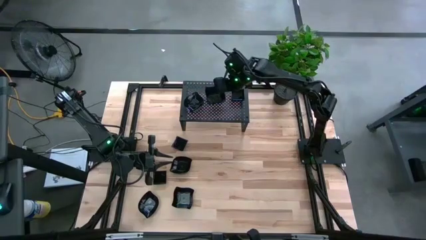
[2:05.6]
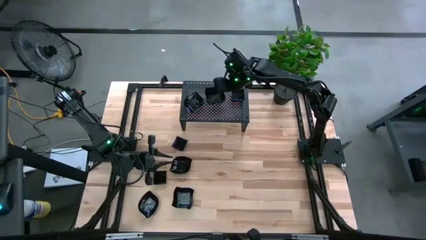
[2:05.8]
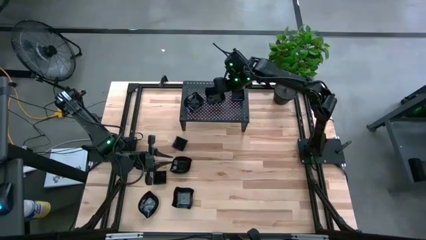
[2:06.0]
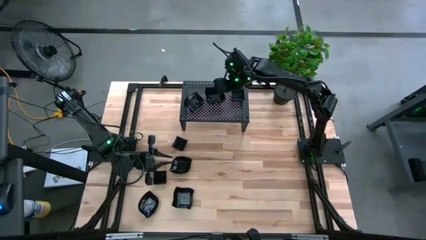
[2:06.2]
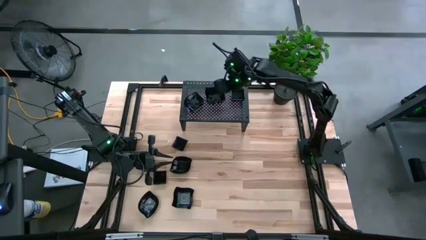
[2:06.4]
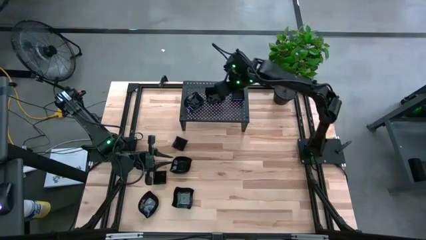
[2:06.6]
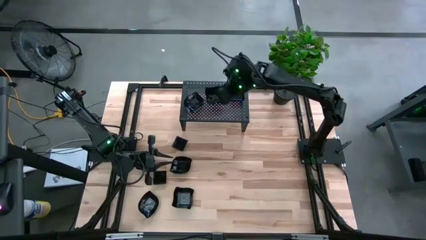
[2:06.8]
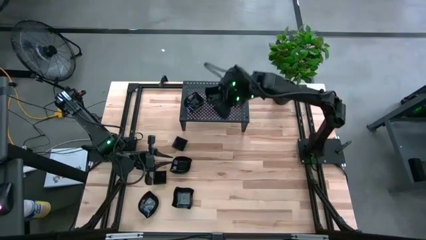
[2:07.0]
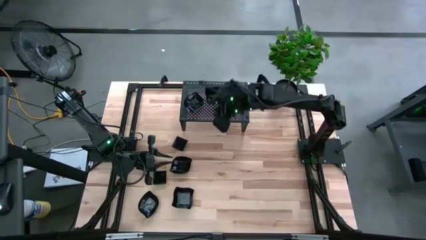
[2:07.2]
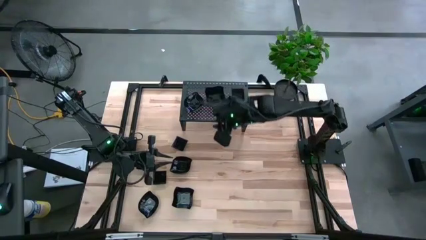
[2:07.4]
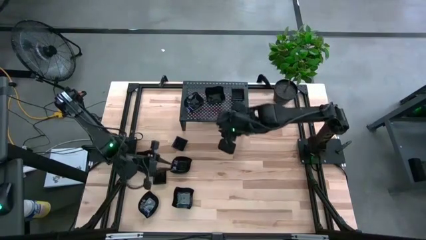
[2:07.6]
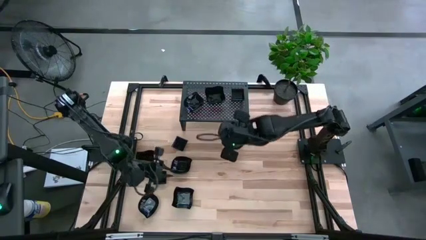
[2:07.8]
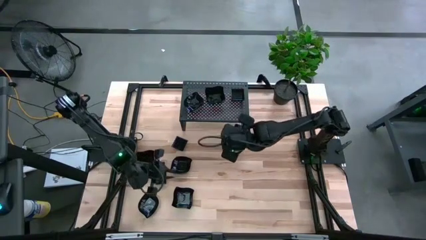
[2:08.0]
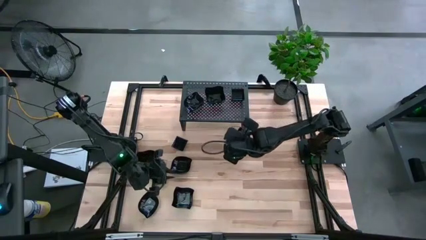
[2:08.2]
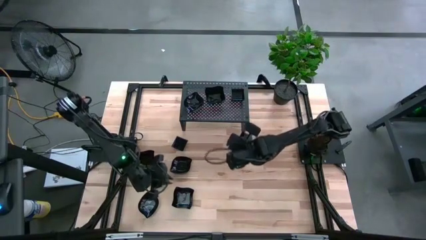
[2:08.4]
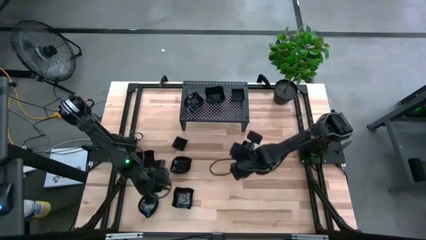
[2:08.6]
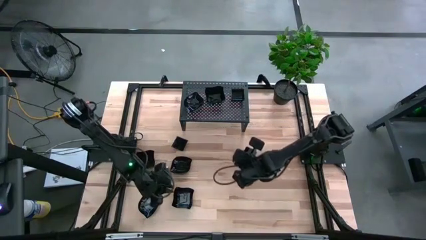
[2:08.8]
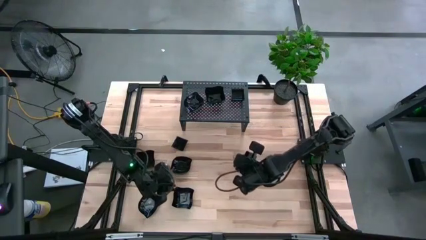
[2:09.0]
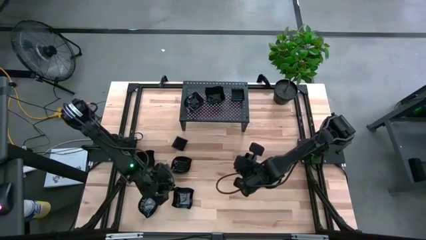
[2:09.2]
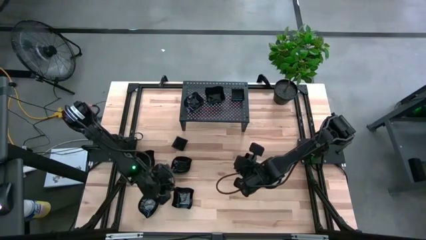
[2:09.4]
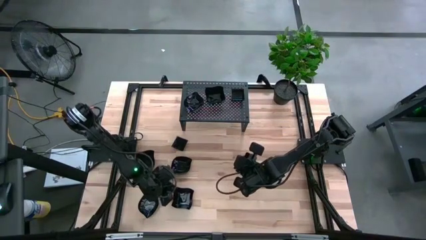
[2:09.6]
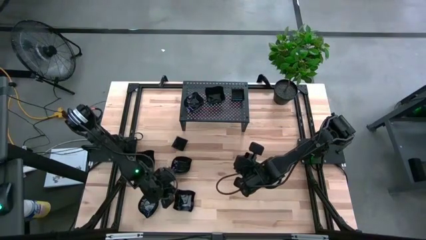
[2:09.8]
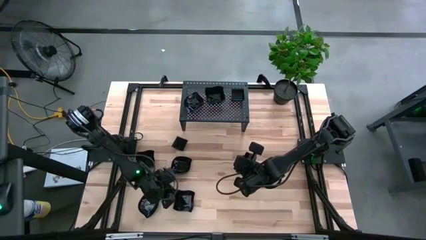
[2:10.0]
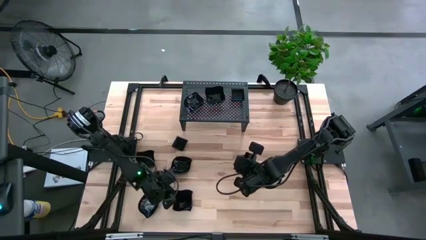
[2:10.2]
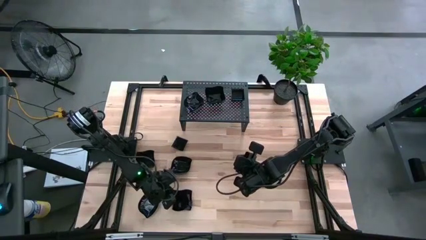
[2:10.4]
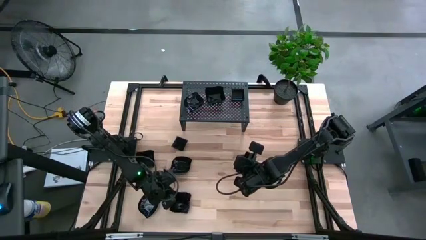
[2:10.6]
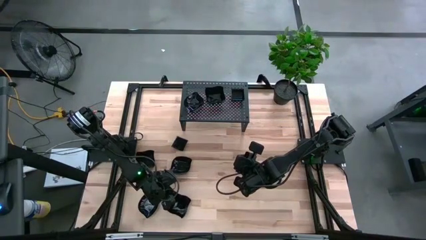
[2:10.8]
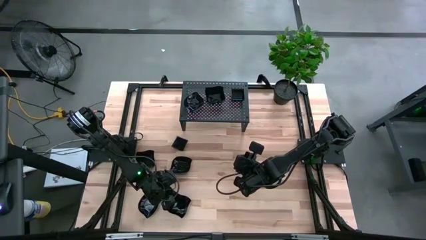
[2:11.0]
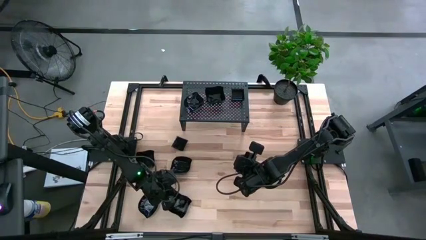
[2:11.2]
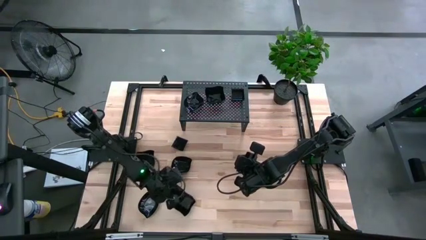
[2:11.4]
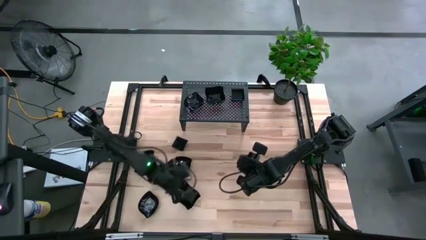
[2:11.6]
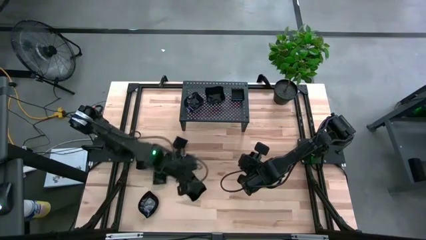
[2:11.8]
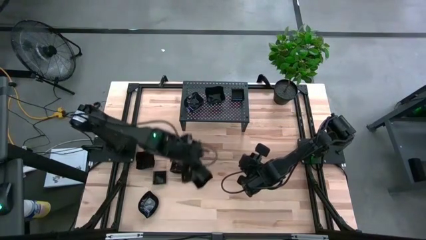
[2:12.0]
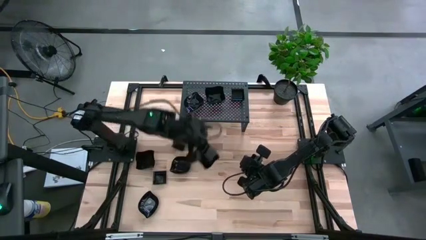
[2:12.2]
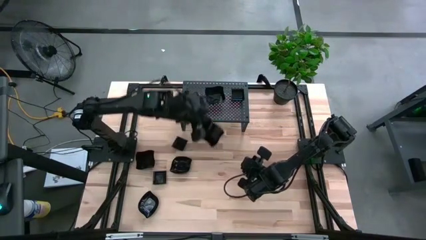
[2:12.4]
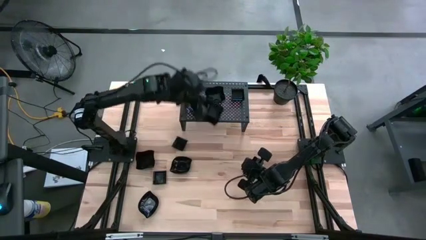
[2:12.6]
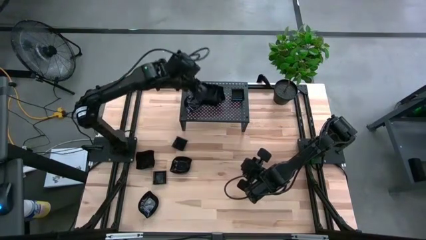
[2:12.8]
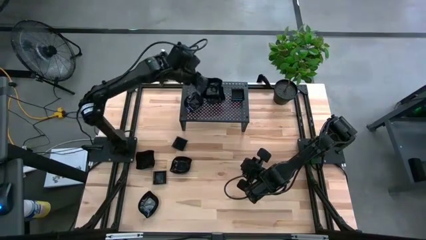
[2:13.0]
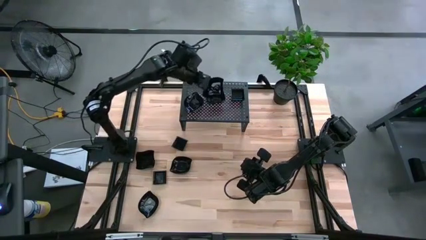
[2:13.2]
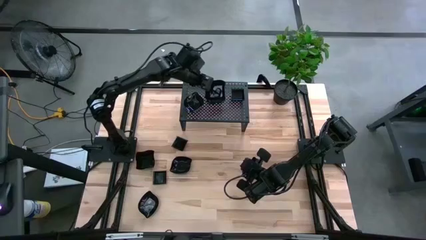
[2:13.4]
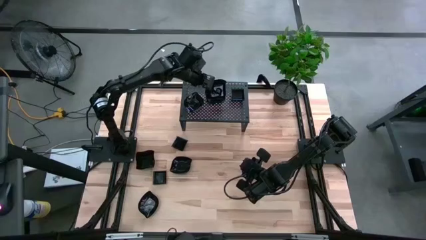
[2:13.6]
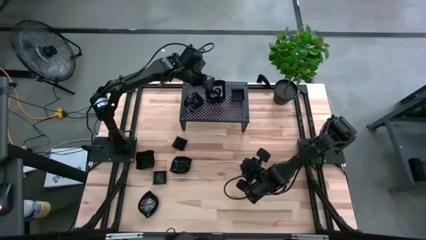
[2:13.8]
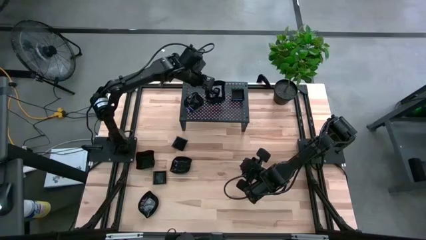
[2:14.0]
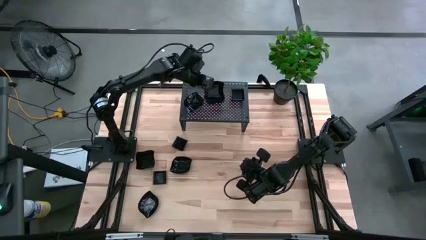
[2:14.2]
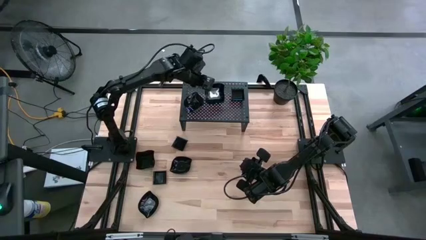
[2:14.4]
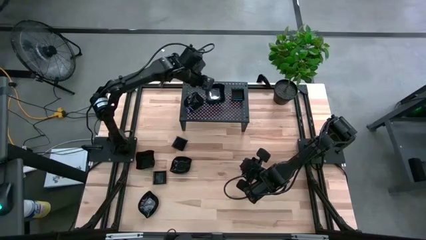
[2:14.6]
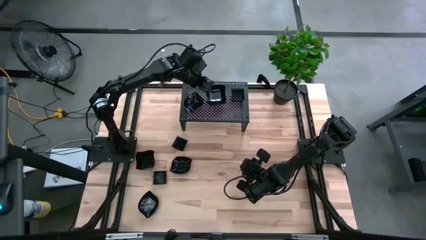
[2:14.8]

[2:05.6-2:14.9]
Task: Pick & Place Mini shaped plates
Stack the distorted square plate on top of the distorted square plate on the shelf

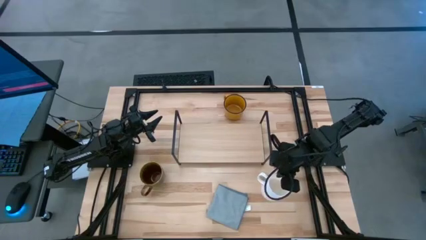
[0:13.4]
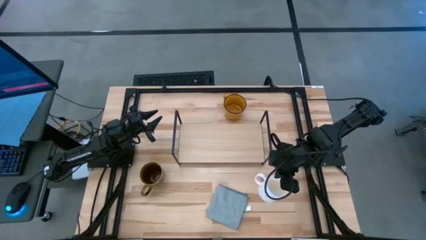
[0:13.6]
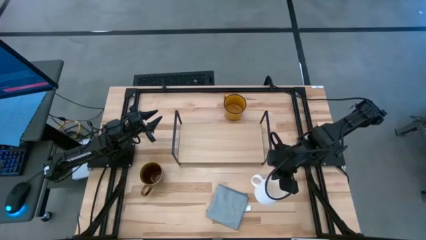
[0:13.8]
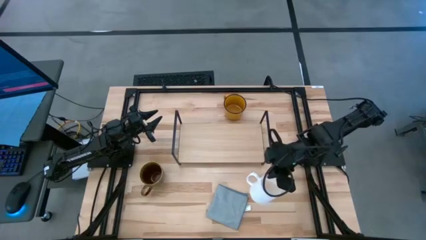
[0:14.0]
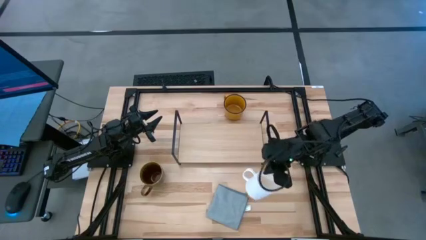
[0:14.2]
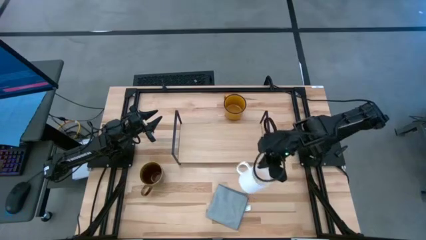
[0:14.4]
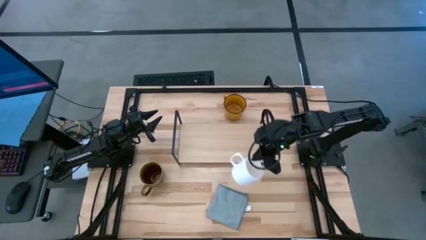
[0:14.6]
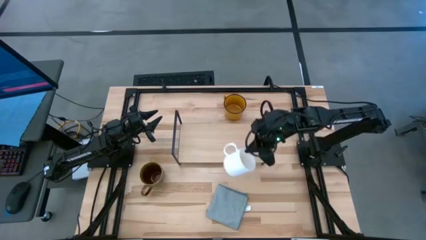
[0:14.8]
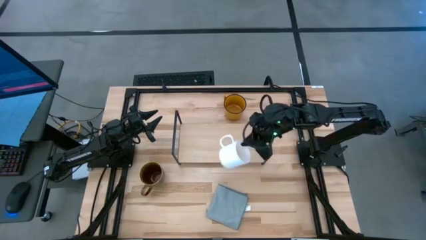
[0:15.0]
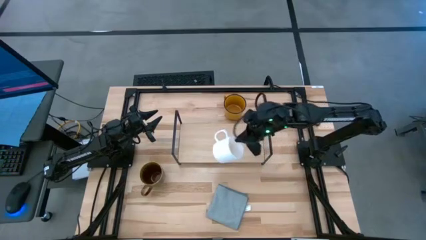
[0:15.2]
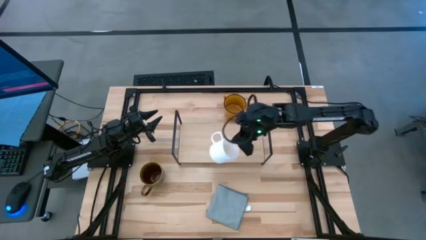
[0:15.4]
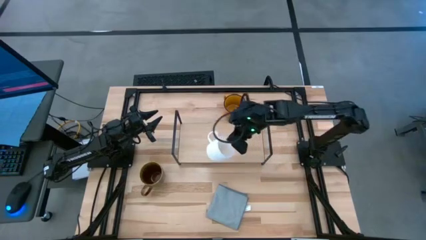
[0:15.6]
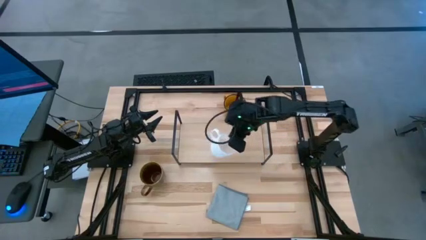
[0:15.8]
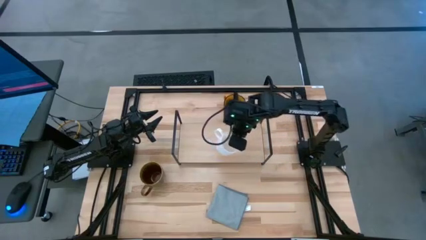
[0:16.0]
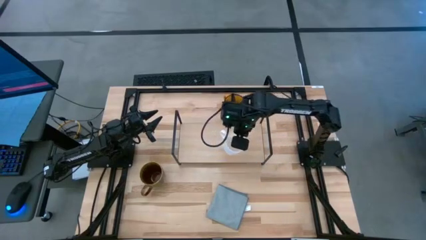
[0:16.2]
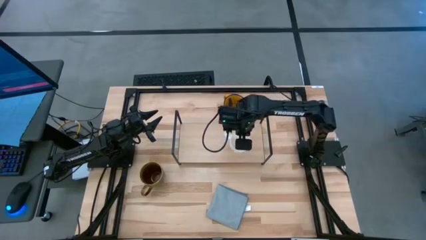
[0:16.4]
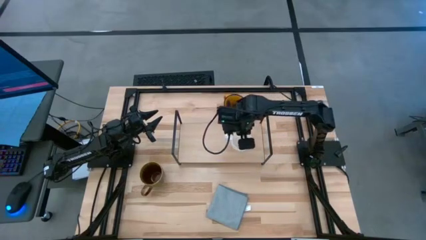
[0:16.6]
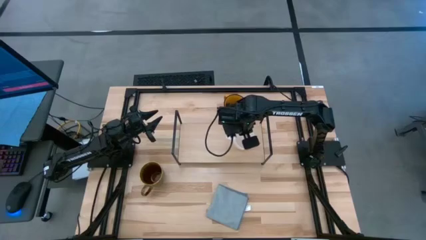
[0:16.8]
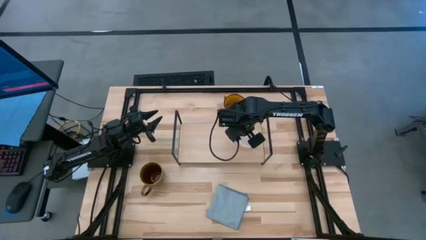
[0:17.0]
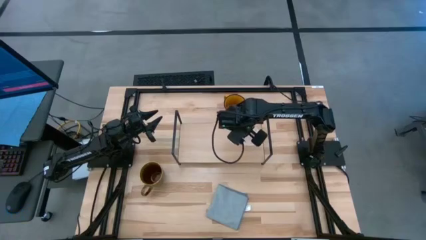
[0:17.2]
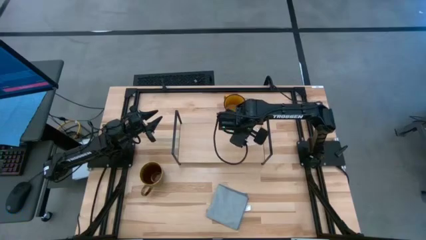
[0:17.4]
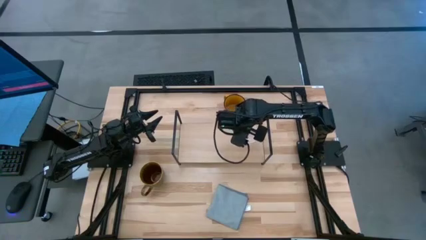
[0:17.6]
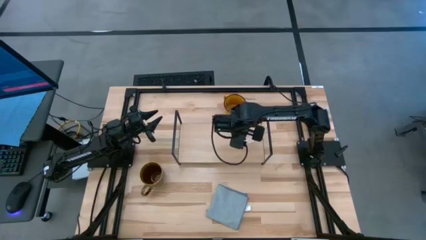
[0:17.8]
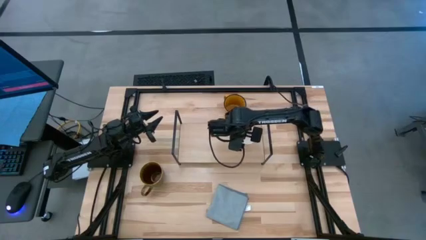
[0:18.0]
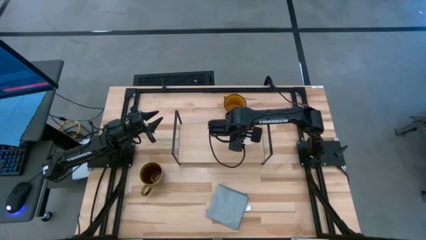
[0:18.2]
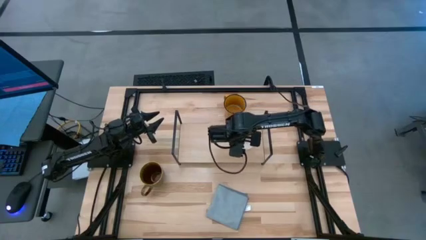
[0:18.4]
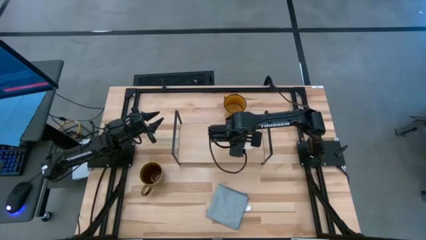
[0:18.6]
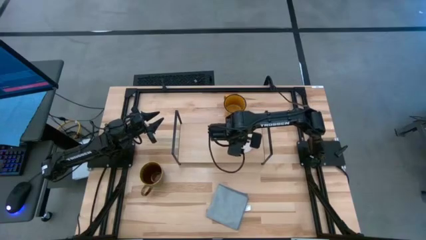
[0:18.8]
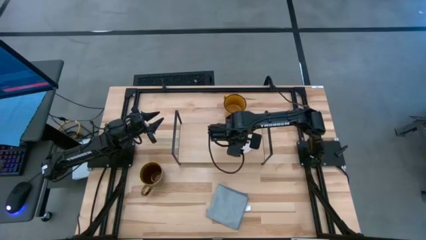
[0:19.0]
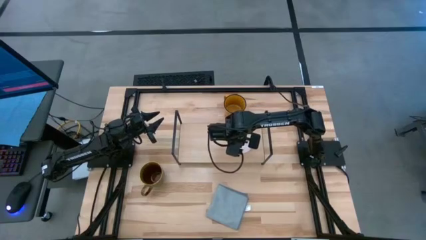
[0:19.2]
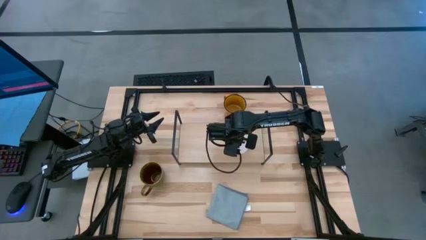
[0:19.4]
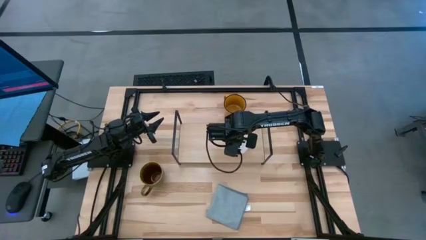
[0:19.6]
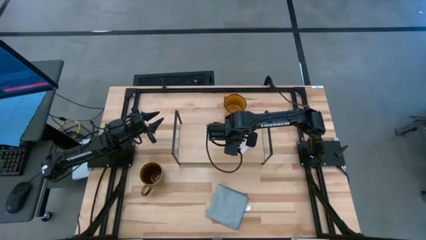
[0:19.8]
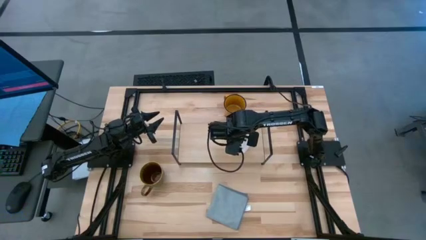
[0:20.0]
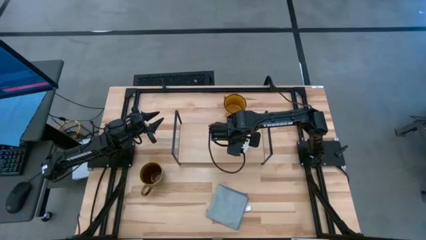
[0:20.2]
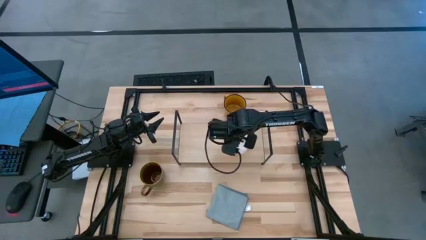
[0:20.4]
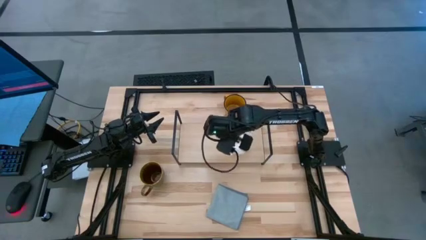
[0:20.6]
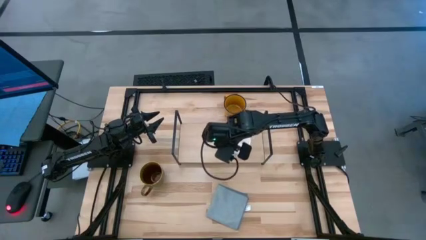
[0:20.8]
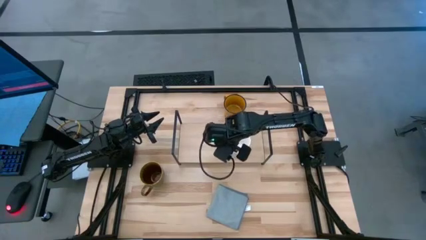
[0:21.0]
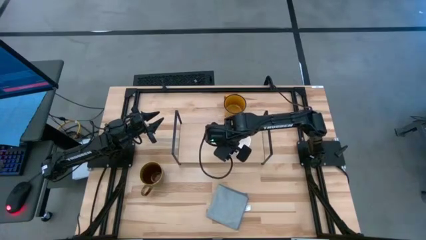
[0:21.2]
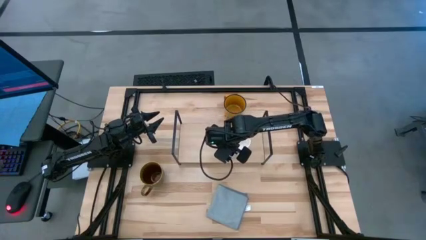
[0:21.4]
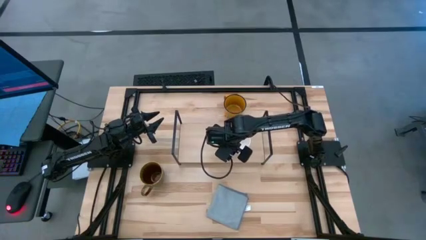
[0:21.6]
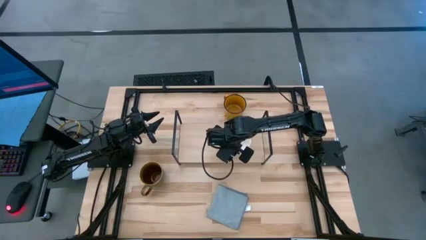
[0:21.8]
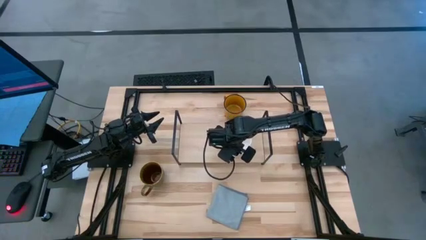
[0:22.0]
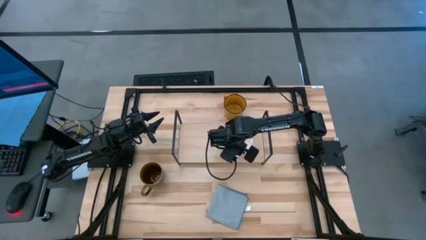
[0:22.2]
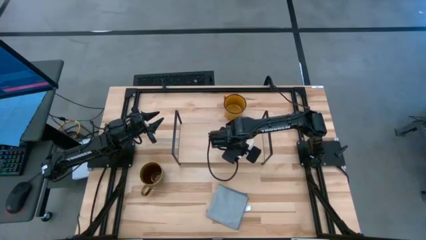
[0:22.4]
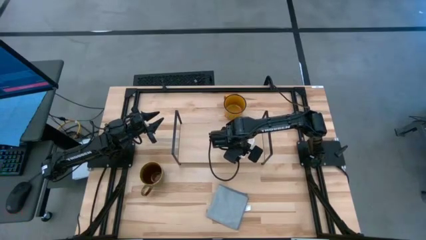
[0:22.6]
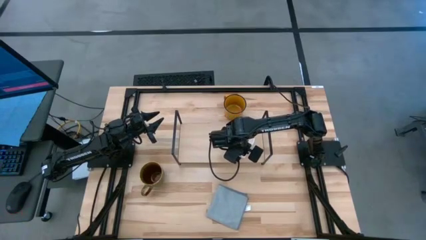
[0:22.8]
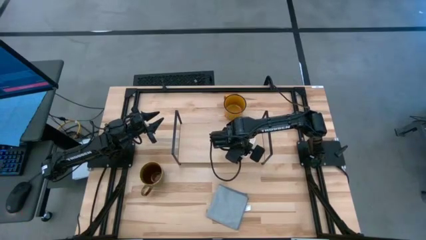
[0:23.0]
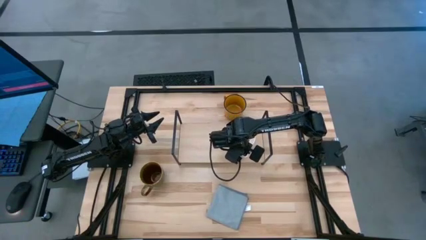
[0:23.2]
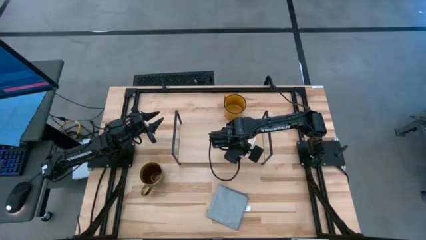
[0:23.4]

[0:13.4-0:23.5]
Task: Stack small to large cups/mugs on shelf
Put the white cup on the shelf
